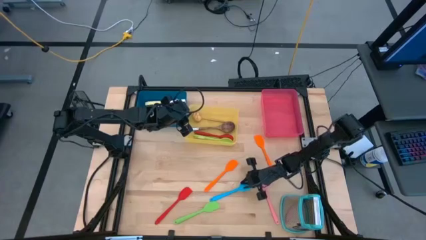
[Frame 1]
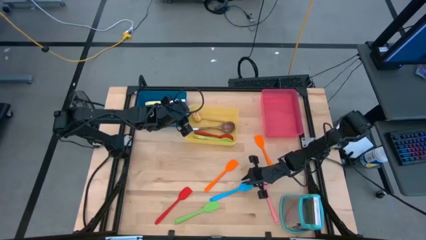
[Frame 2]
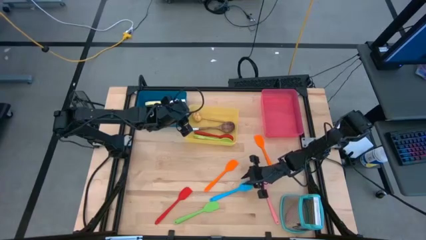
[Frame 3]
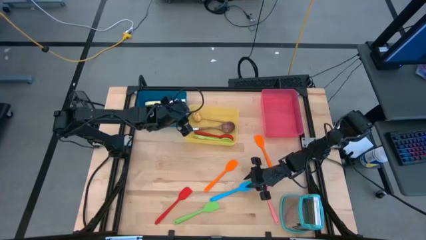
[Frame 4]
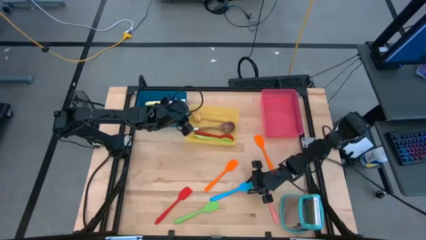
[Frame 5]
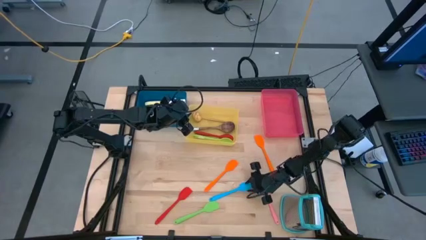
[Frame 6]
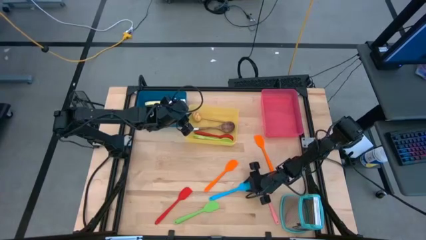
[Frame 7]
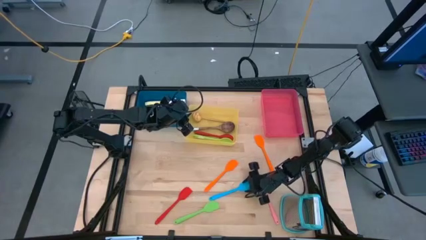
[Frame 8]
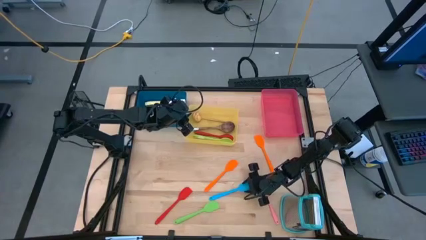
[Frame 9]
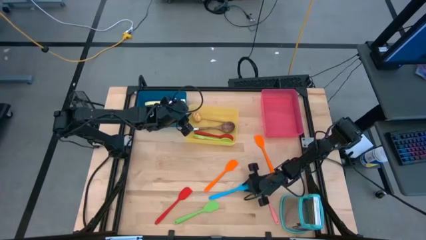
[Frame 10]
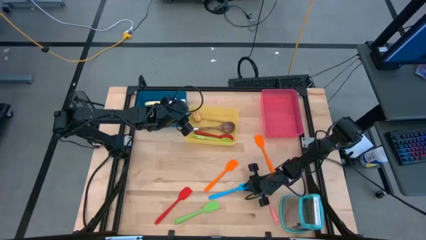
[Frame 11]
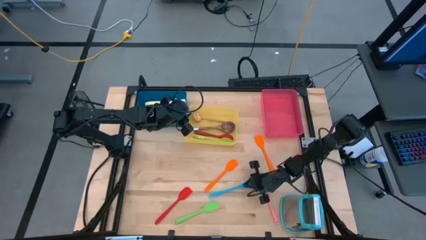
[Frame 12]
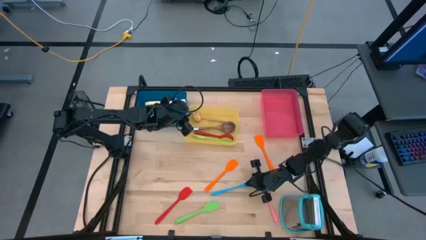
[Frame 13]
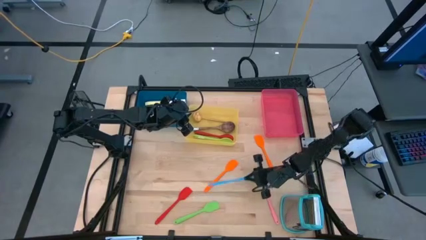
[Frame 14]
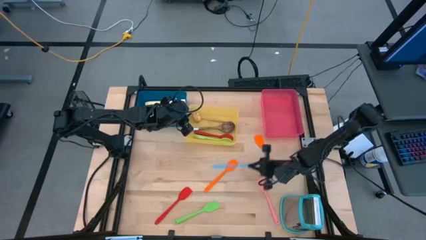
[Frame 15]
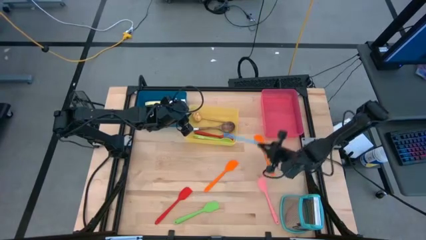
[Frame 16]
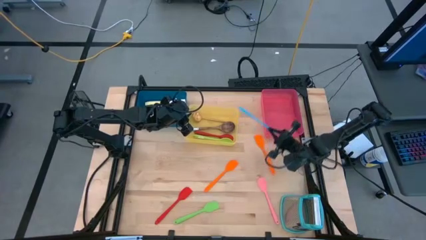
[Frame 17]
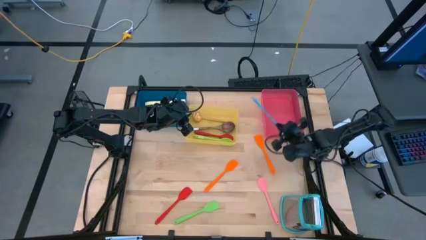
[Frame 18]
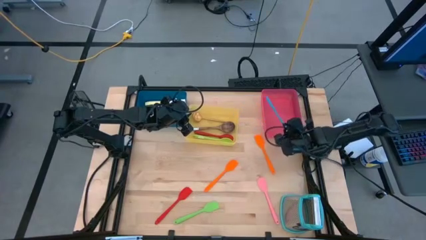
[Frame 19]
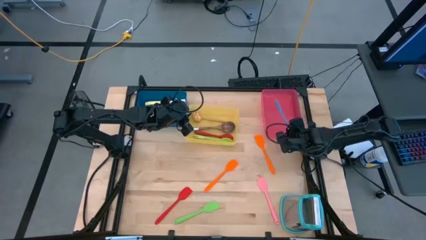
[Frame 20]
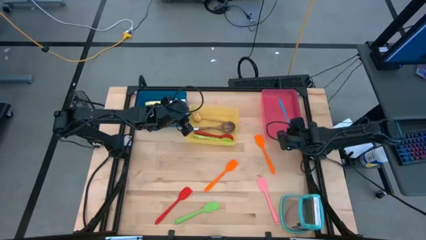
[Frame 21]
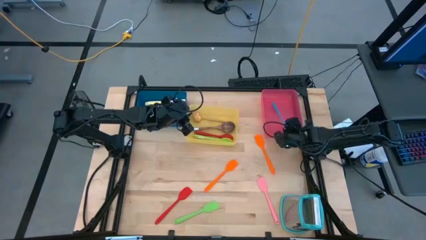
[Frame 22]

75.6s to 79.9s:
Task: Pick & Place Kitchen Items
Put the blue spatula into the red bin

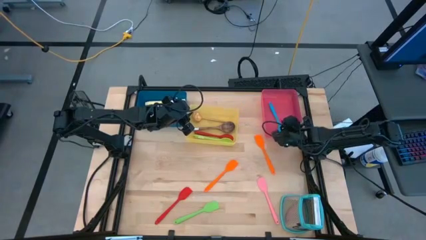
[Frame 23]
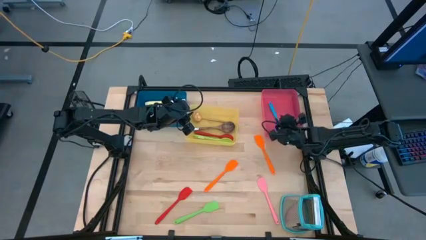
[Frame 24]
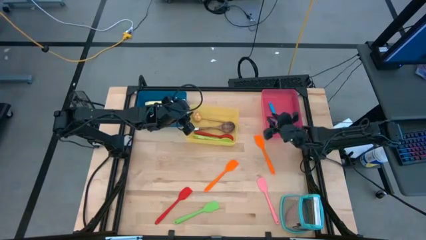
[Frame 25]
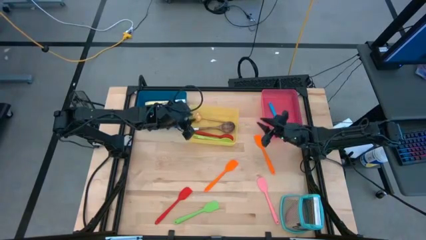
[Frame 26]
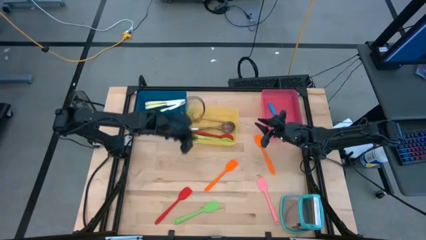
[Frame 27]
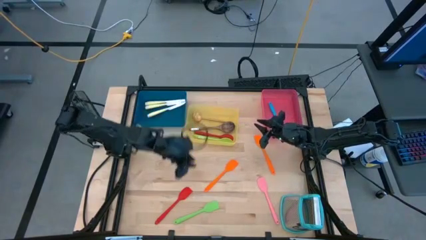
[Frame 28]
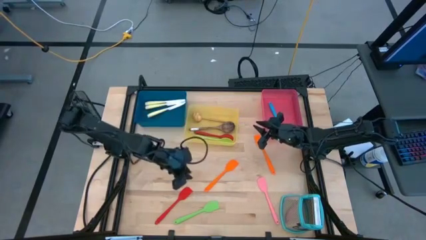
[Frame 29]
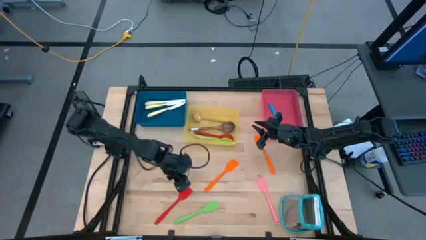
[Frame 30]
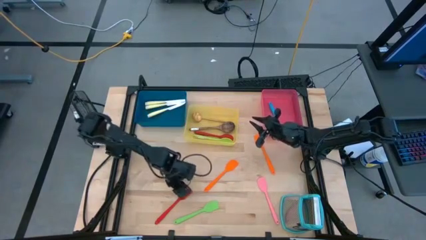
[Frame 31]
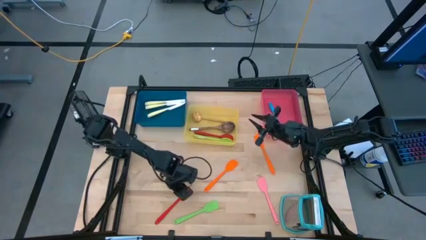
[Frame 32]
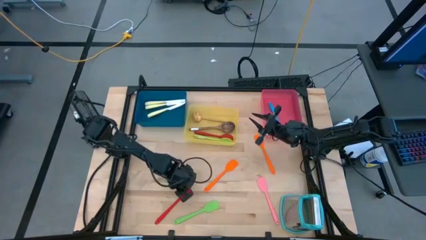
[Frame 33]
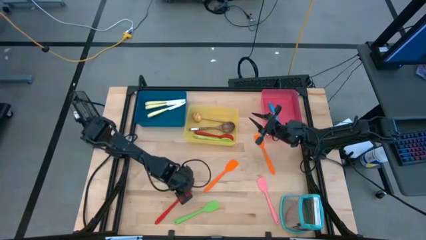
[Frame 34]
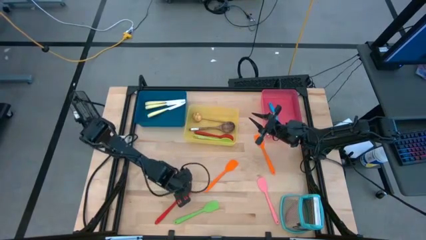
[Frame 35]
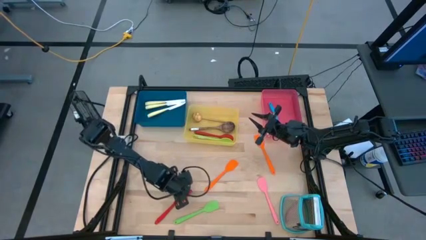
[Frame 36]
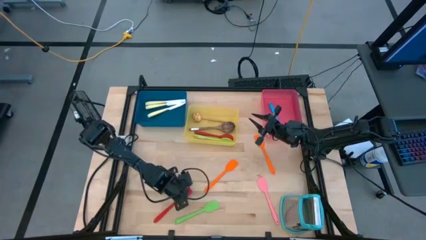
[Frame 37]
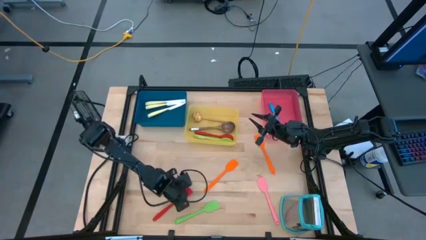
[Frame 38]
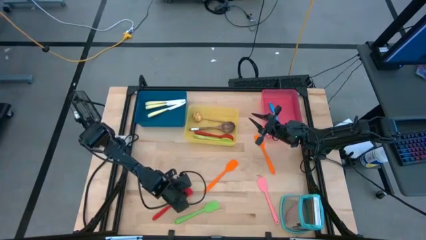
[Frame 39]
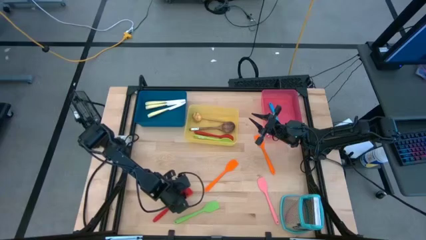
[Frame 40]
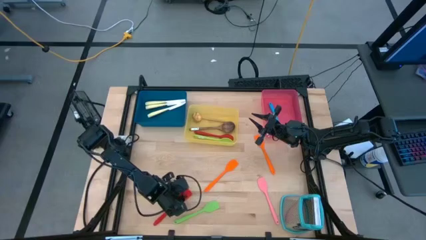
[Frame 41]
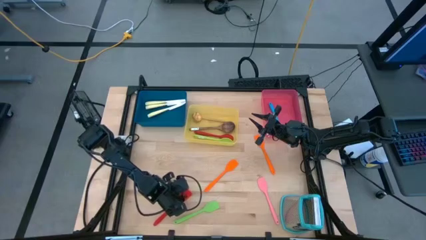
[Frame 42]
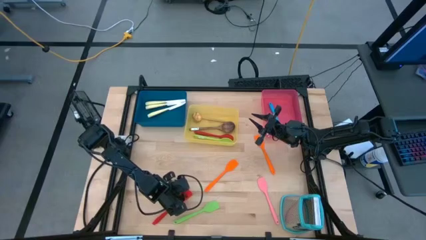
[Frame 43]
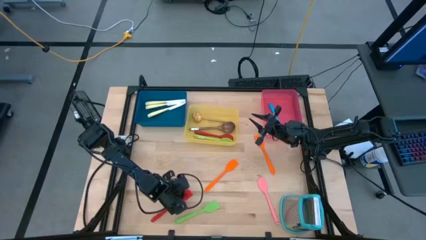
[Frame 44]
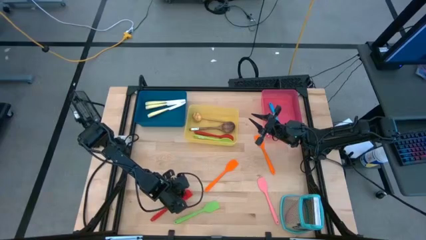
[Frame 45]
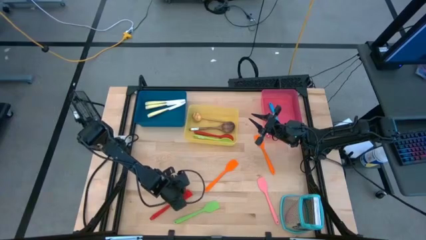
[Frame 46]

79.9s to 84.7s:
Put the red spatula into the red bin

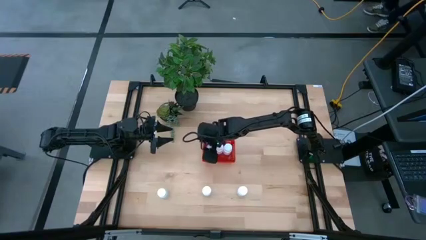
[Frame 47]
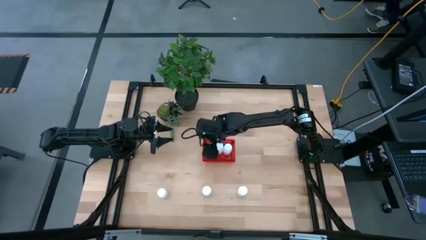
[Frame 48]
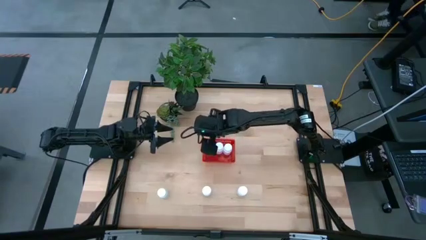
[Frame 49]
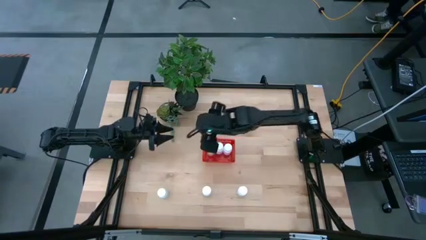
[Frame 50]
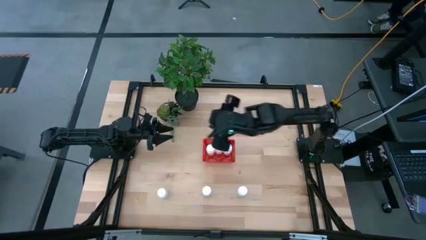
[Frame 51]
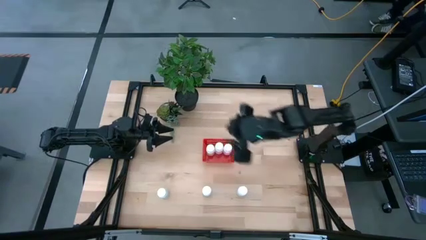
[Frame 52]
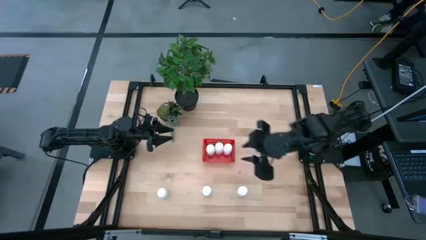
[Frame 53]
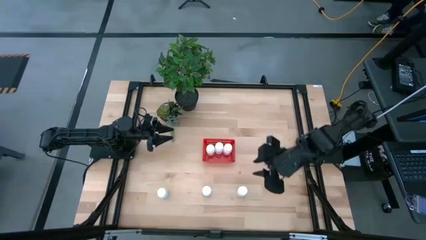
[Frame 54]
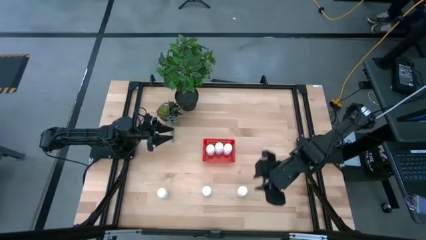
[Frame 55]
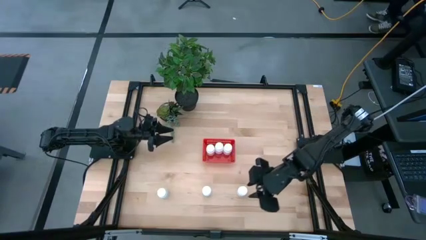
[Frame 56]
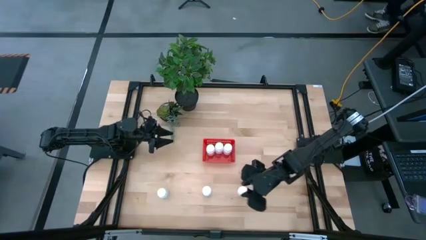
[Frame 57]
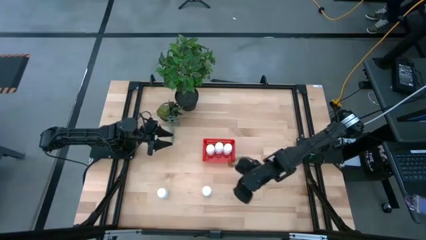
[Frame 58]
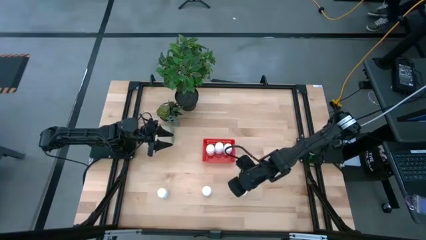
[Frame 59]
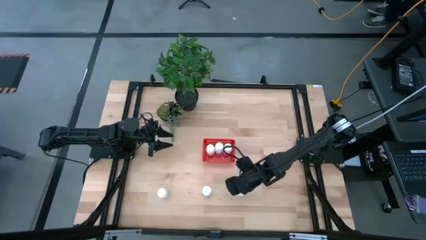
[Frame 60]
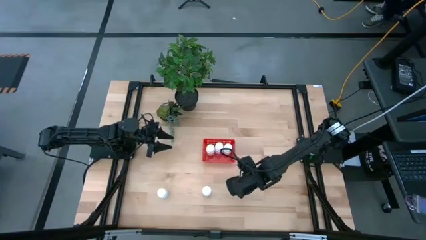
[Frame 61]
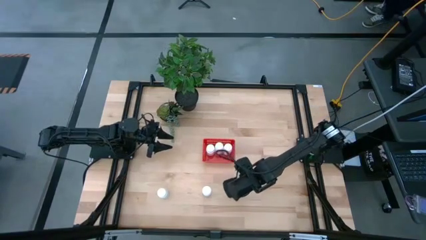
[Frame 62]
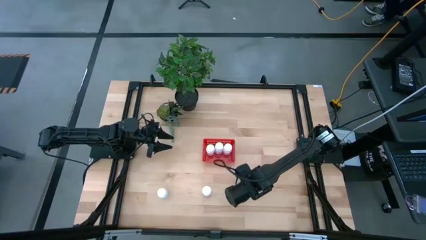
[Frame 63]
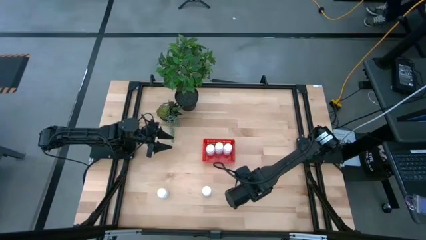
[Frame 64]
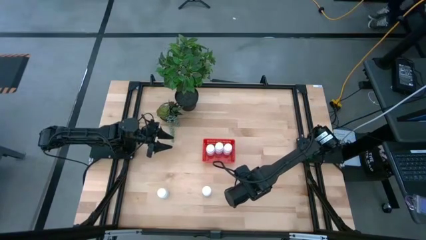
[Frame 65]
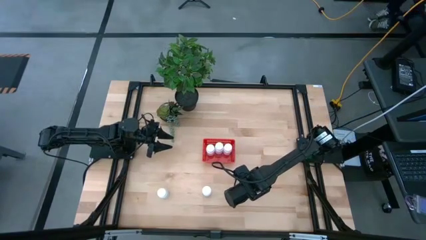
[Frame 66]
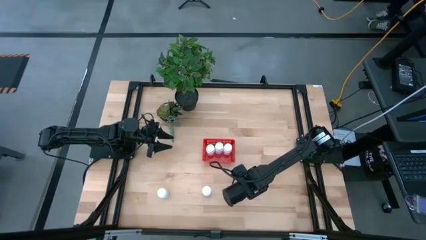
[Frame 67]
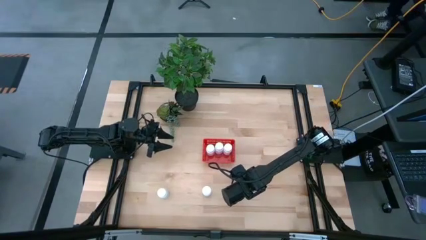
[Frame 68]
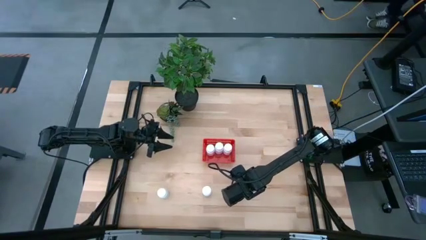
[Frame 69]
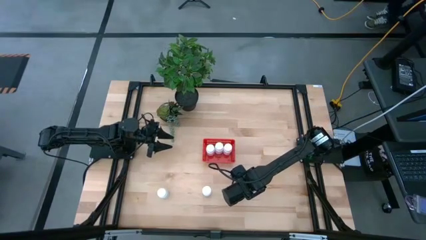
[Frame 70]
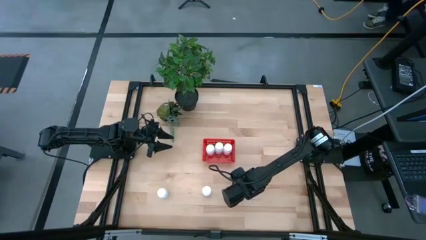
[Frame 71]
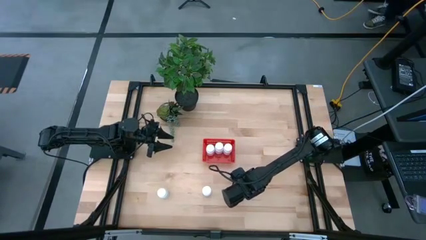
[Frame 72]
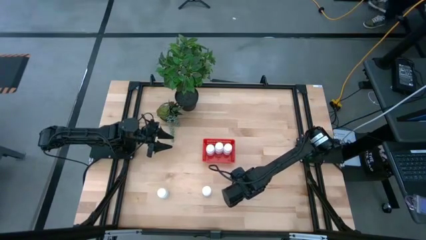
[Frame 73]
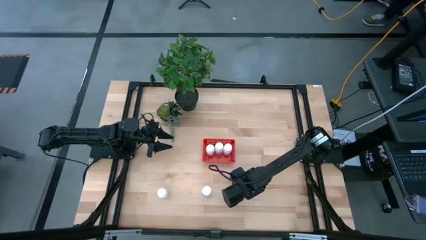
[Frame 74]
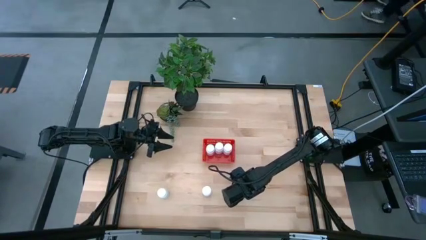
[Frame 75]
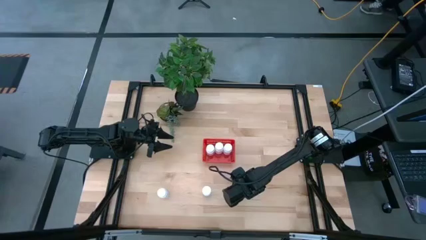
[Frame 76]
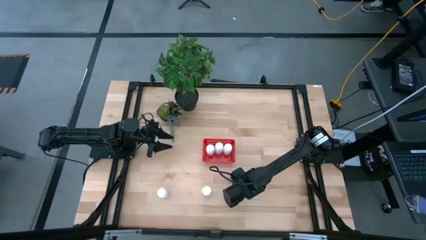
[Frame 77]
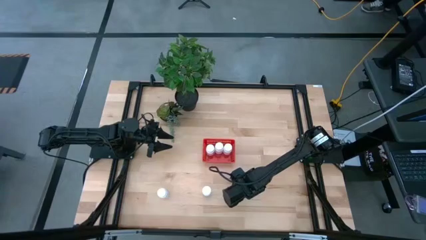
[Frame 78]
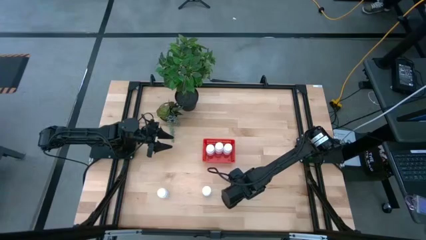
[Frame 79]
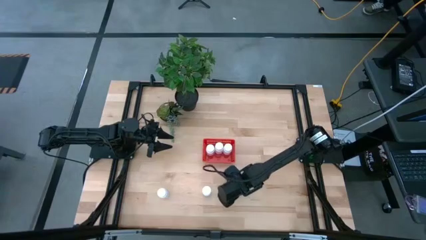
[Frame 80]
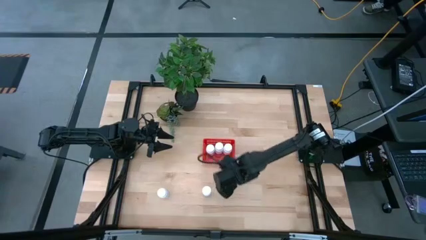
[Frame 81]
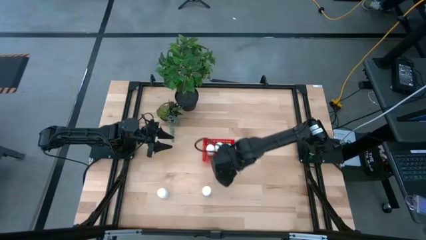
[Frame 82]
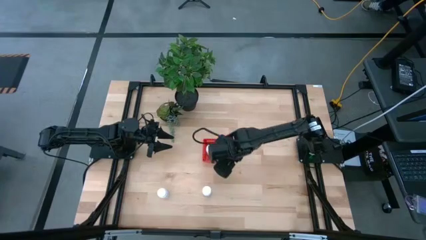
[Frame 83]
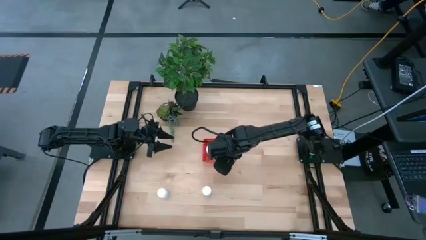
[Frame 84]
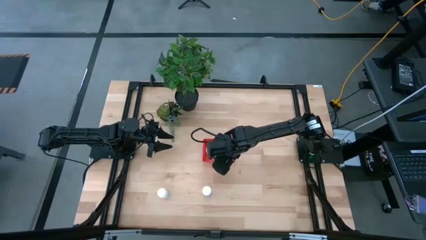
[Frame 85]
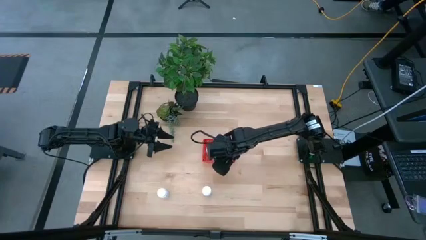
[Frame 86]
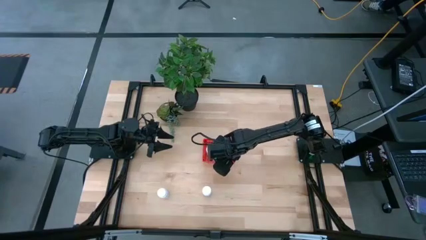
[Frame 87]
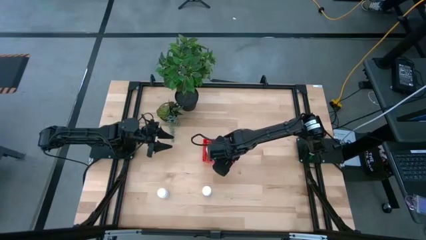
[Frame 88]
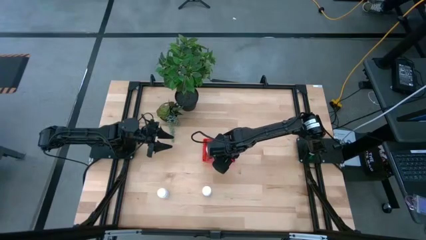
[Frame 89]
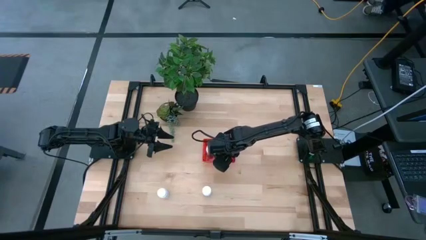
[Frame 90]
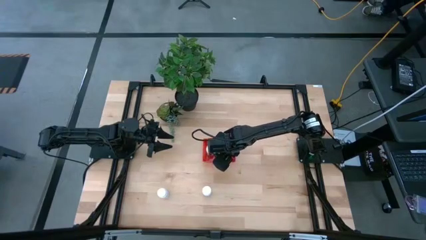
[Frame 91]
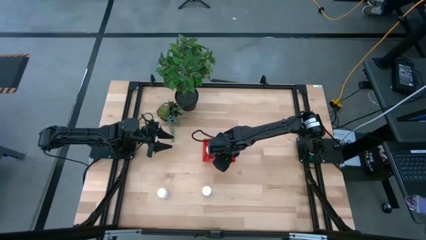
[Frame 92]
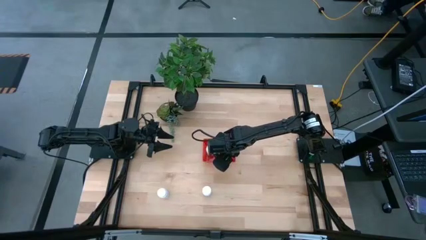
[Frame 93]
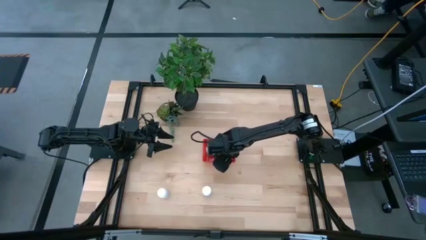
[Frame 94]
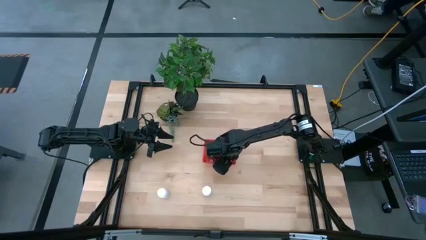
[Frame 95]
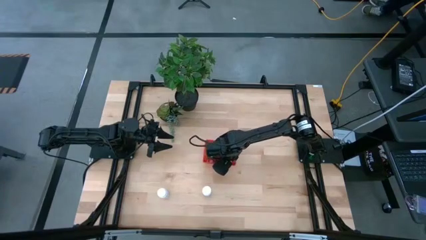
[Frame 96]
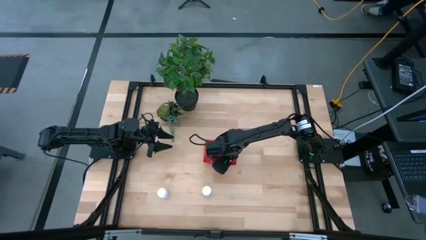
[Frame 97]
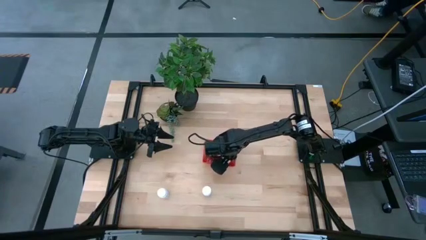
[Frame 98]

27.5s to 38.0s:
Task: Pick and place pill bottles into a basket
Put the white pill bottle into the red bin
